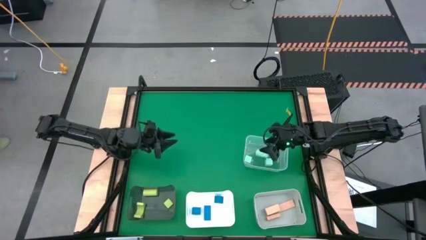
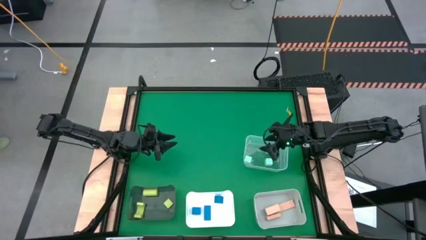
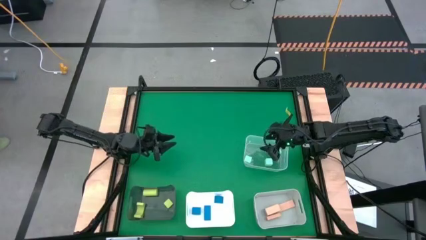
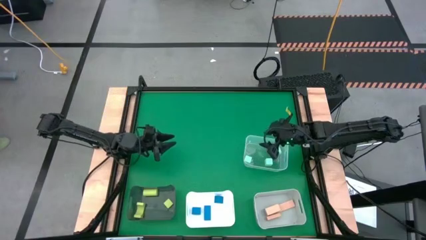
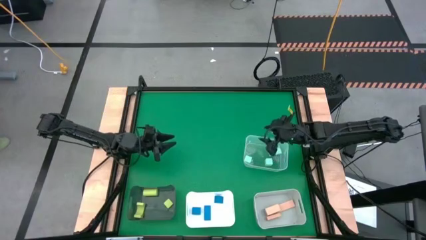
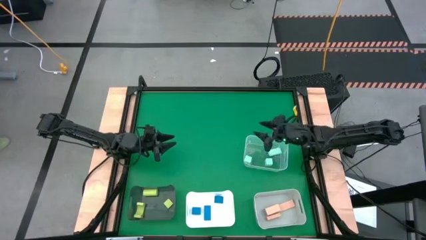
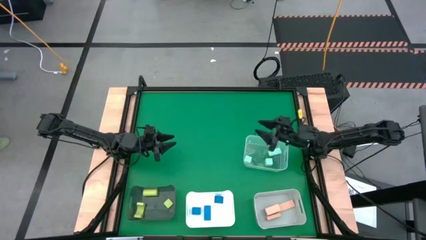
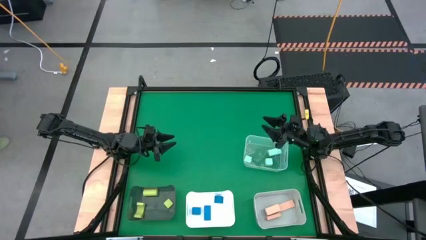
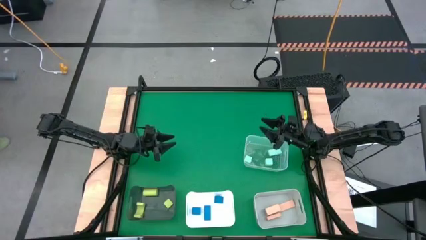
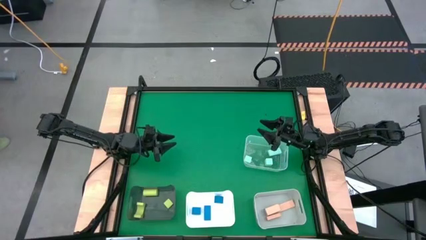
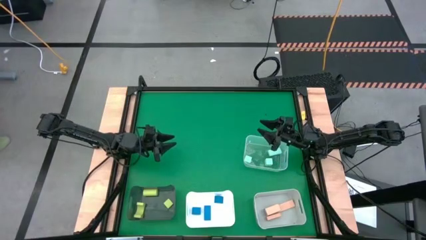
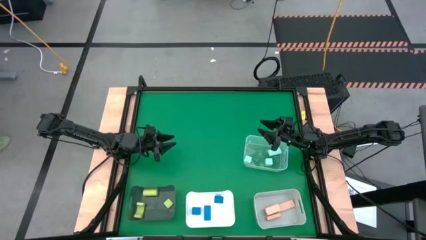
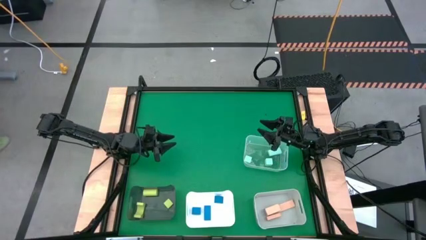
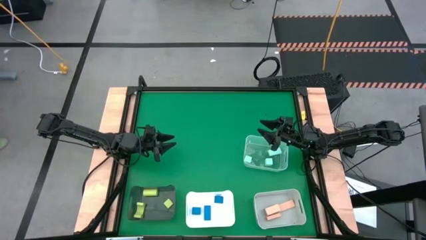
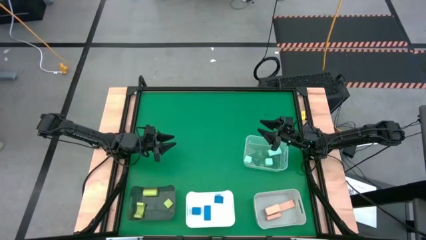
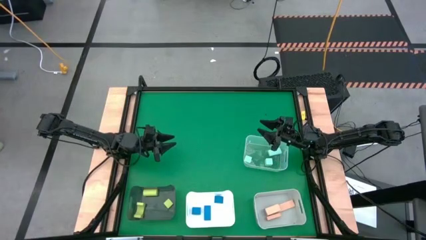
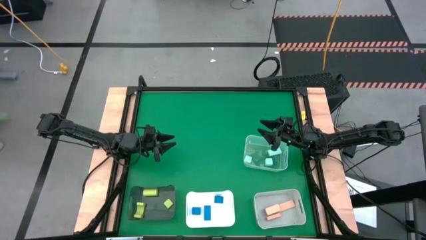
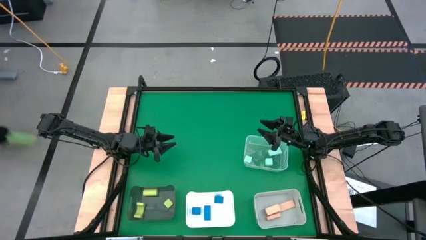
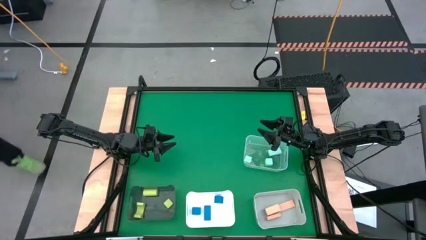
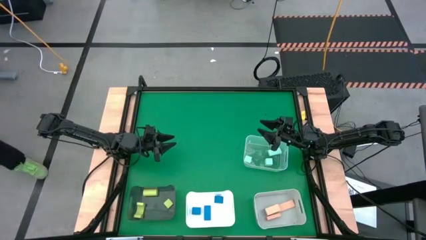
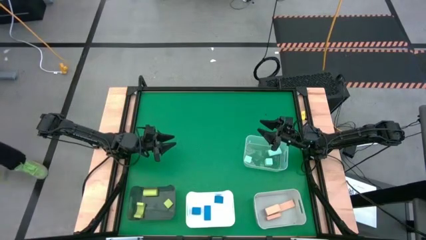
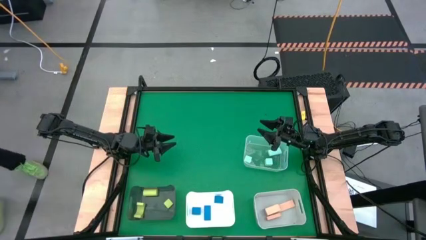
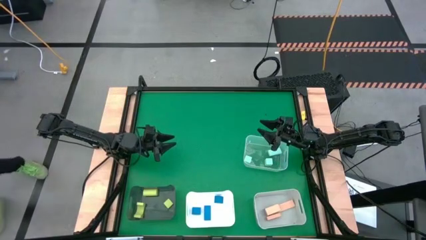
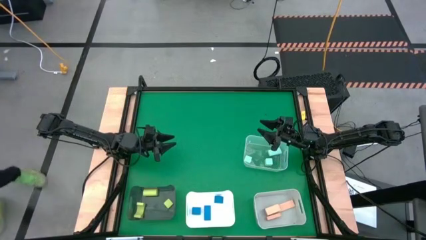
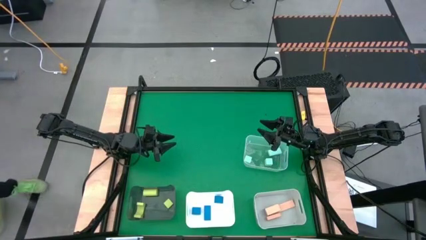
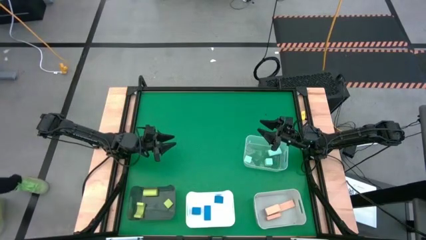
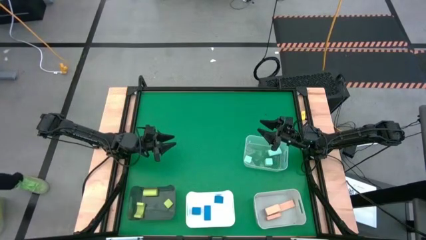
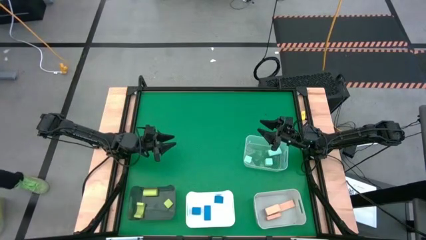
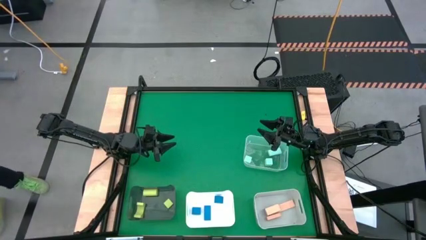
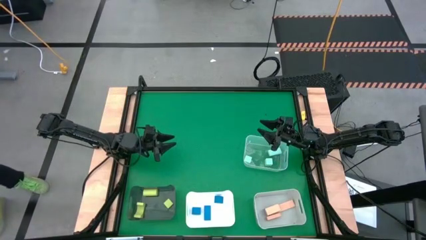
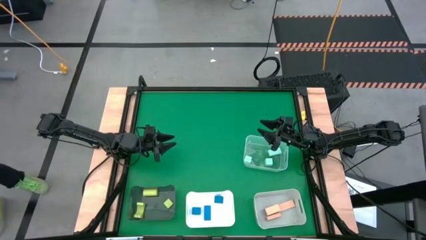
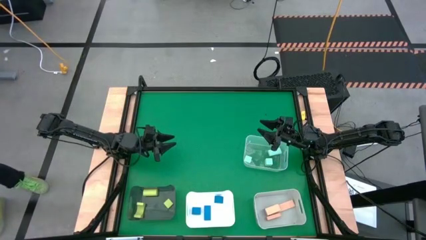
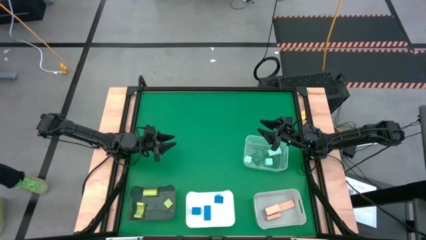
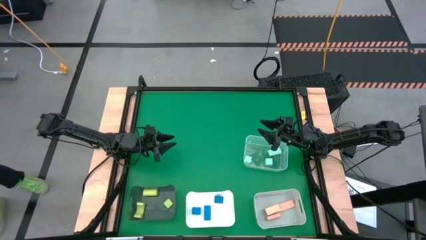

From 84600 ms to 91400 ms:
Task: Sort & place blocks by color
Return to Home Position

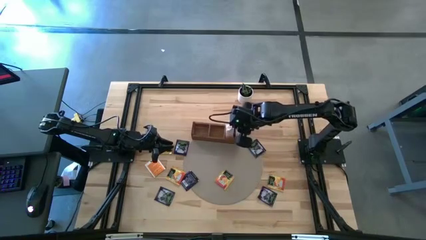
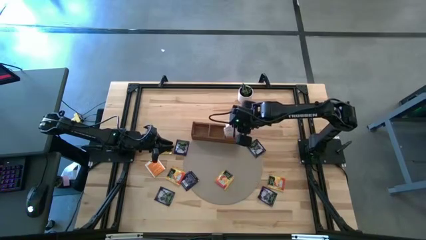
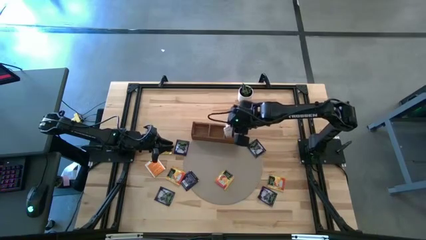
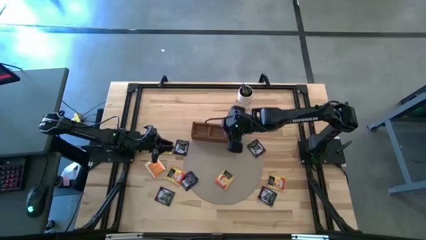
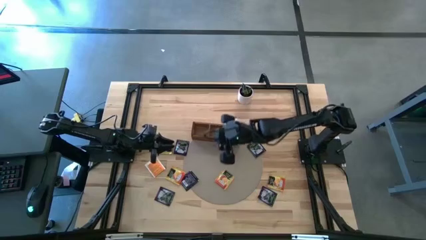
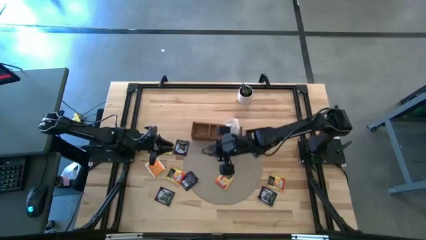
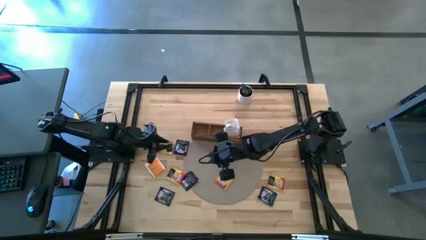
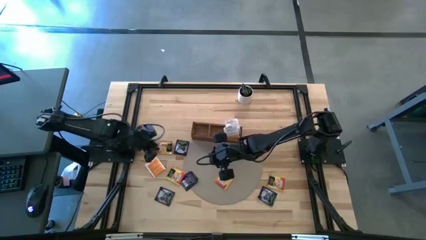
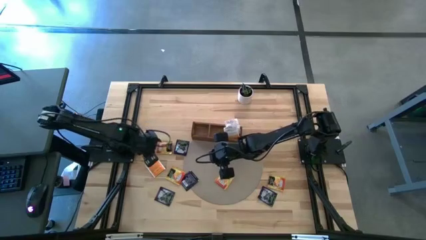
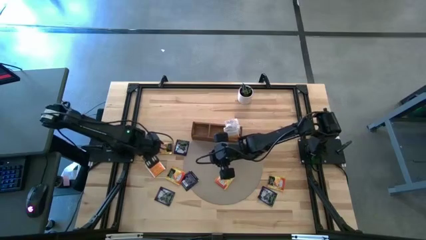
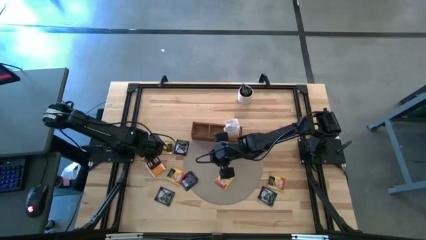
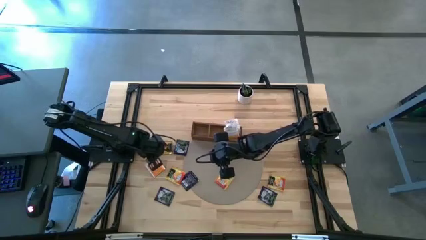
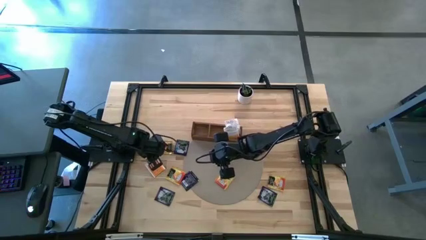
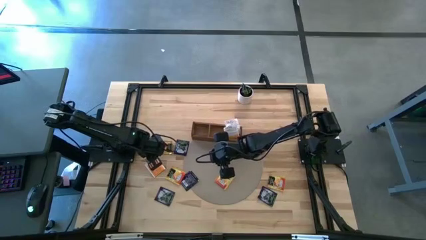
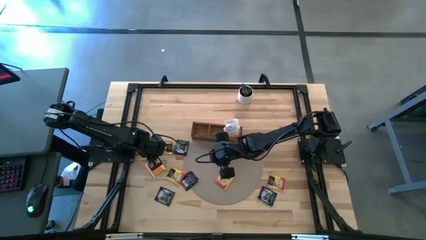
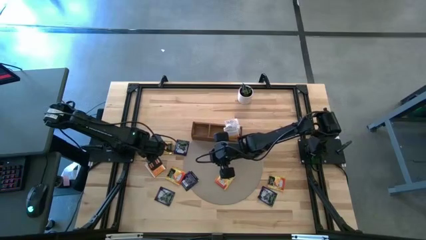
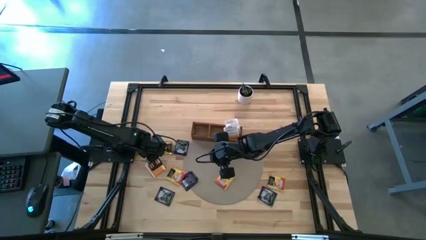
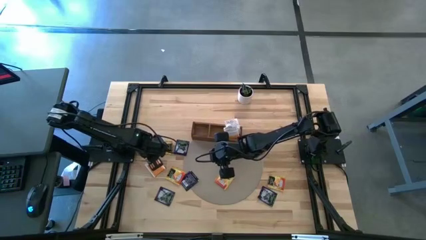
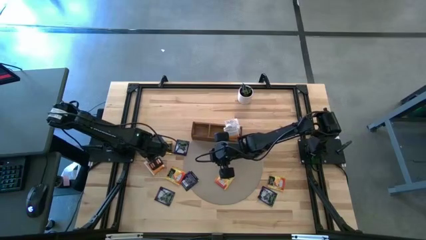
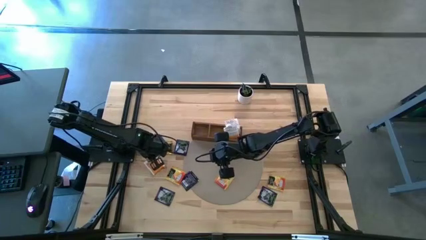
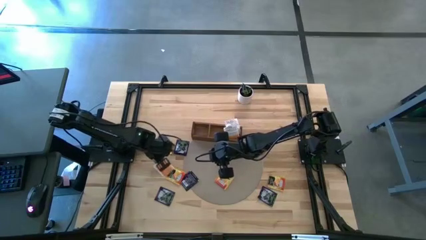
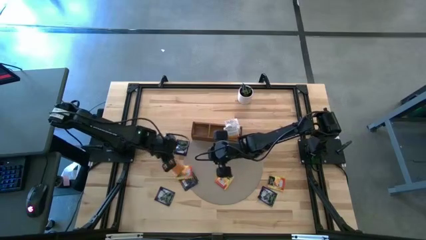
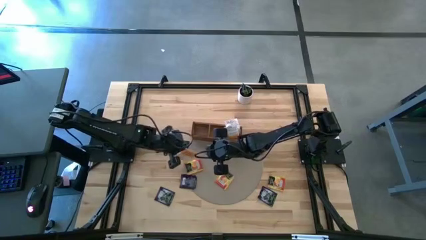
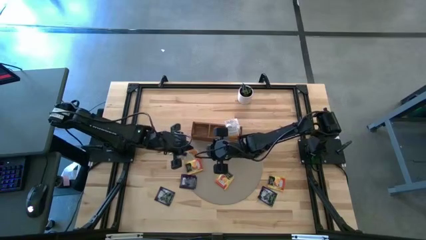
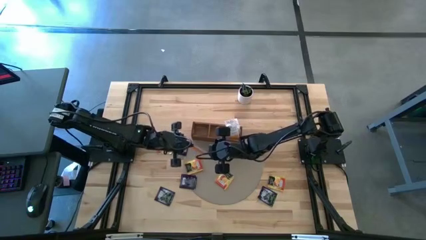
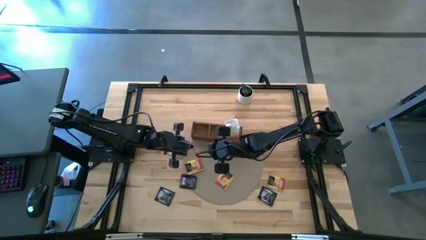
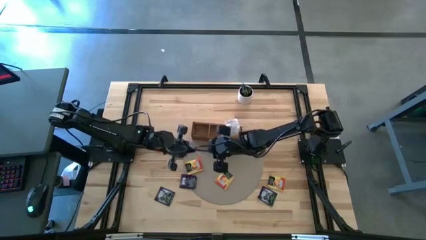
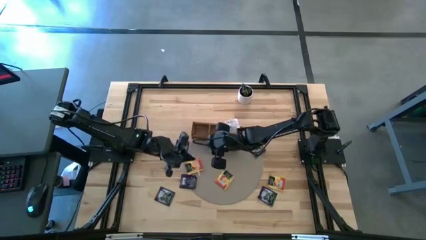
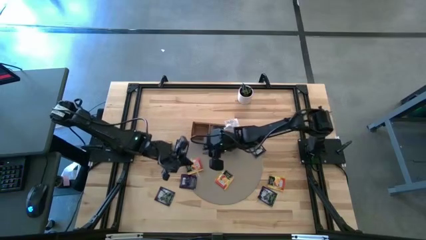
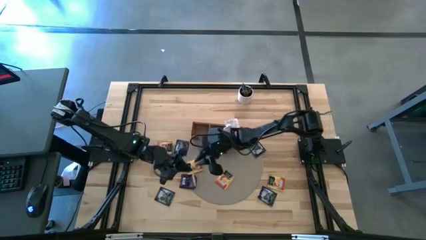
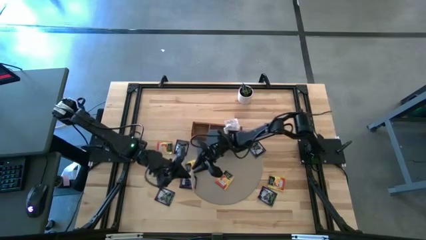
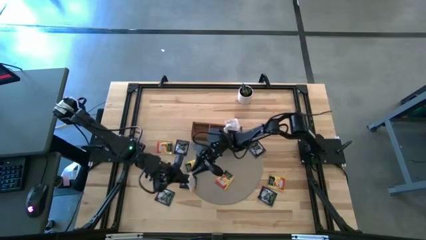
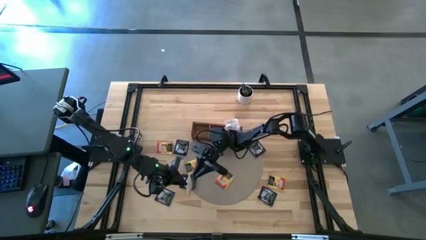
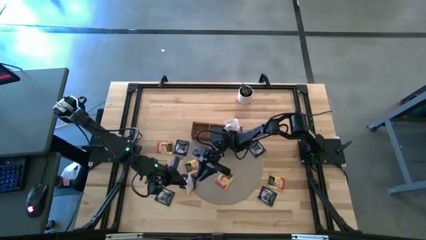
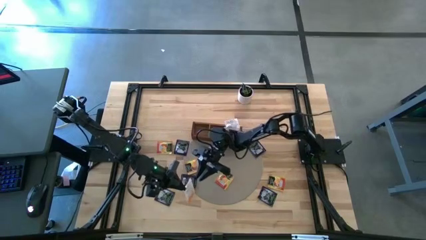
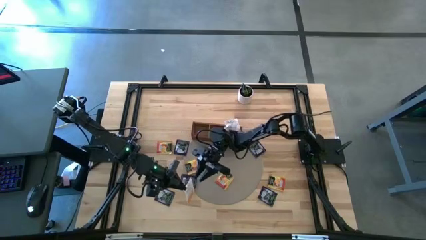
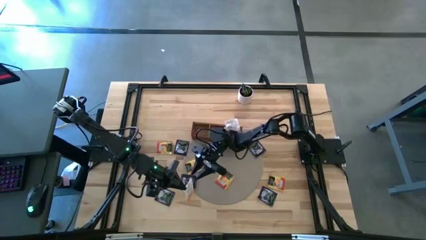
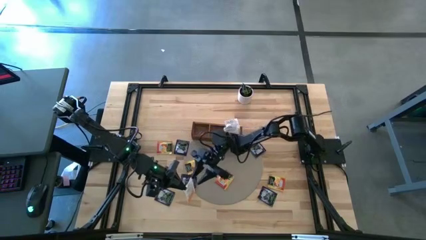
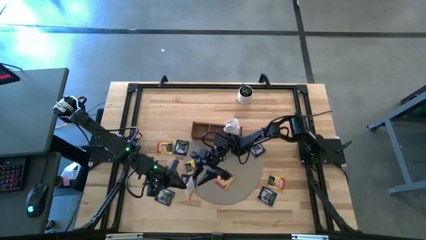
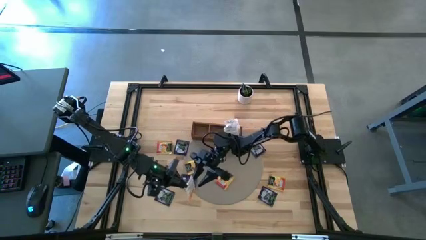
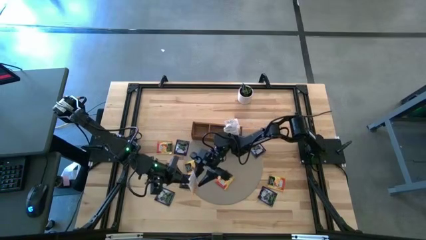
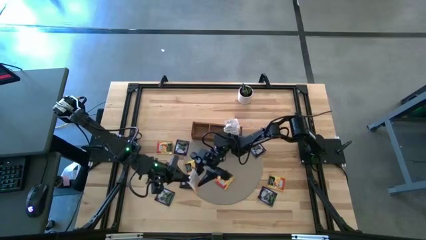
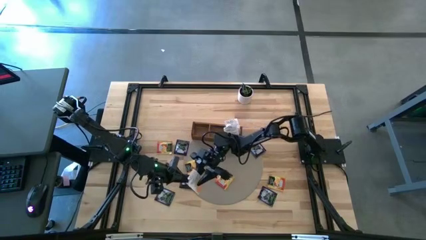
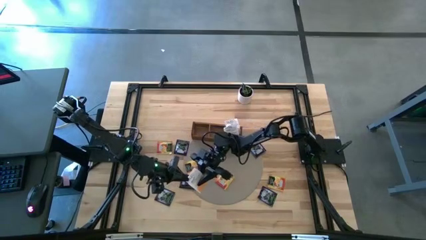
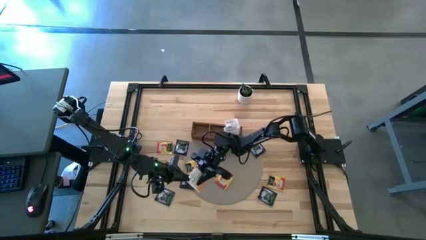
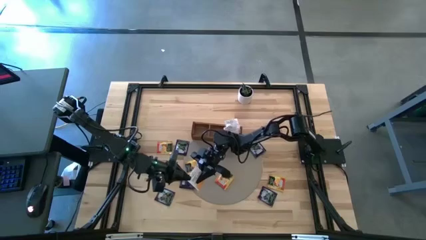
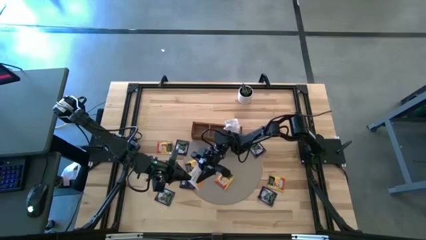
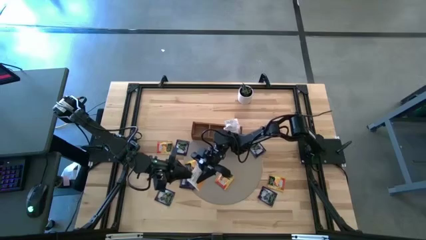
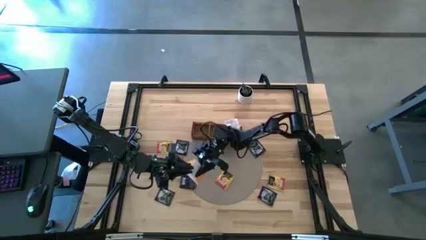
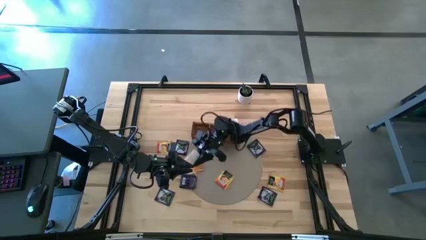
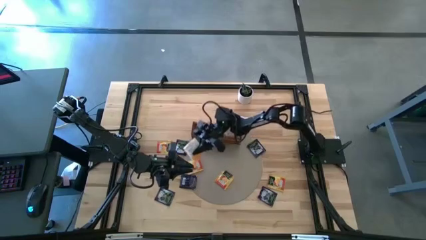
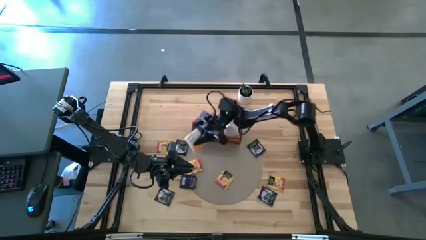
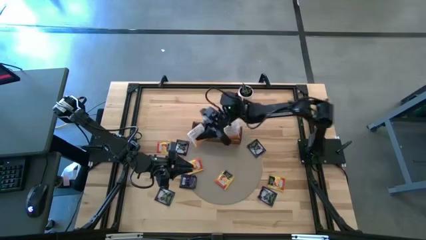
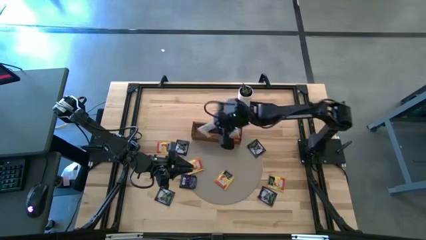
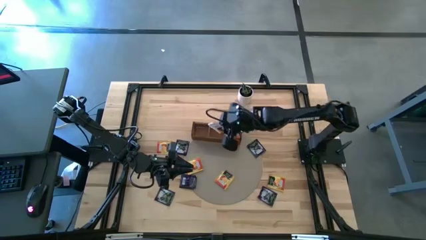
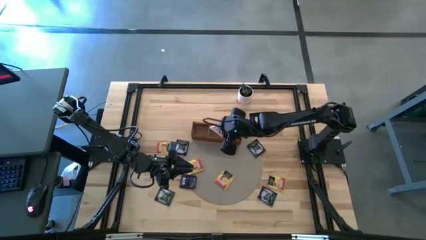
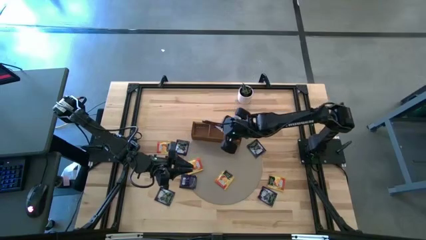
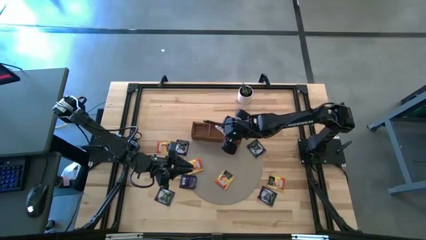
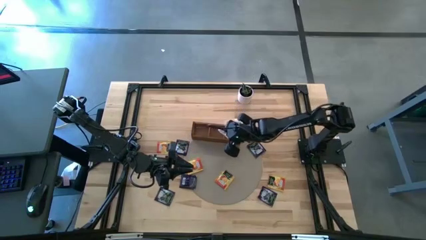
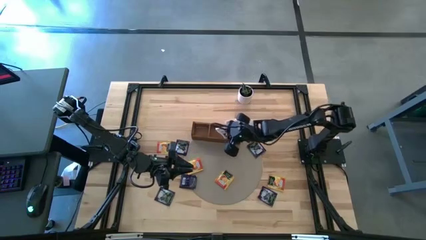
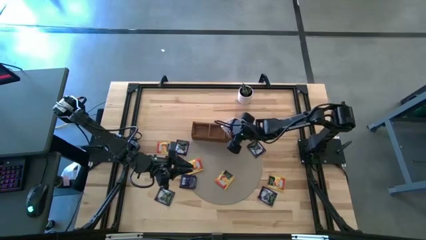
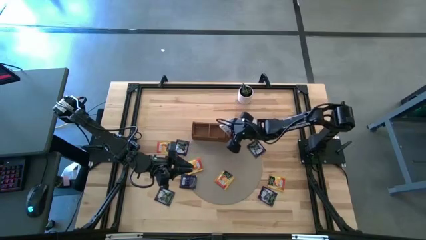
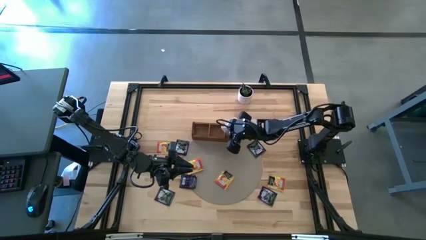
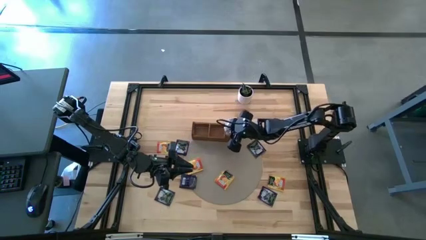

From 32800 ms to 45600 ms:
Task: Pick & Place Tea
Put the white tea bag into the right section of the wooden organizer
